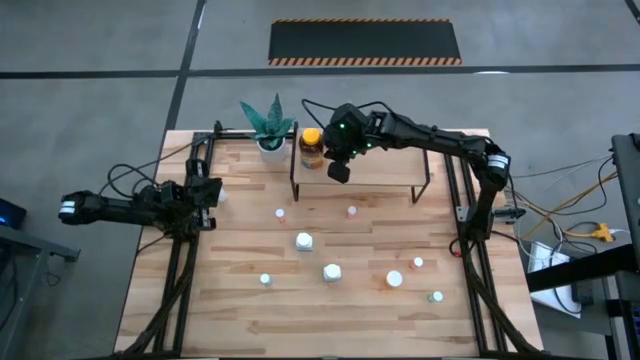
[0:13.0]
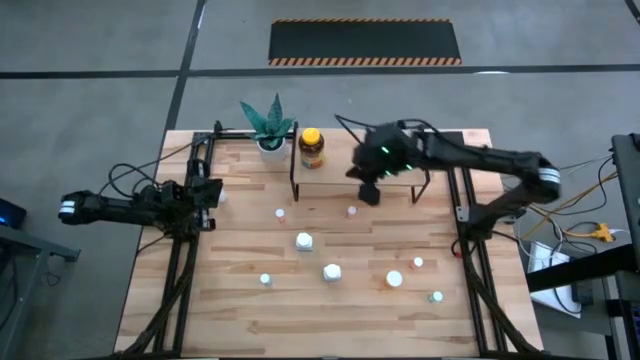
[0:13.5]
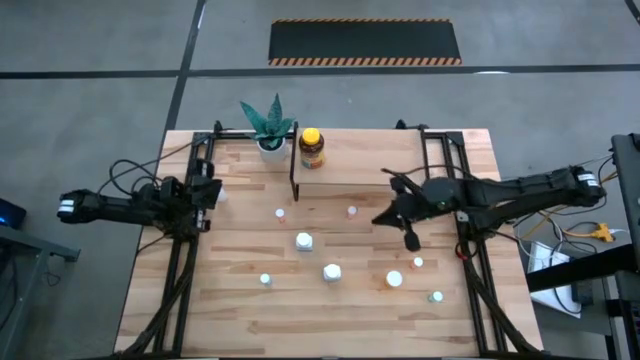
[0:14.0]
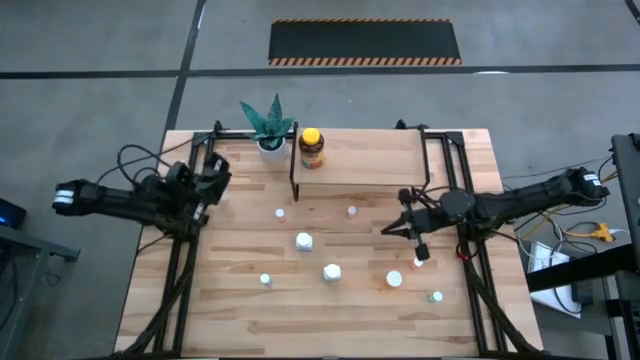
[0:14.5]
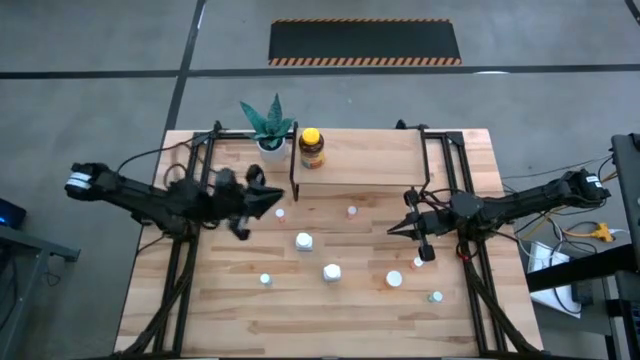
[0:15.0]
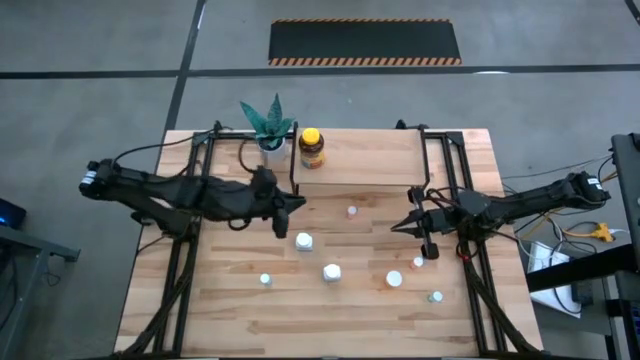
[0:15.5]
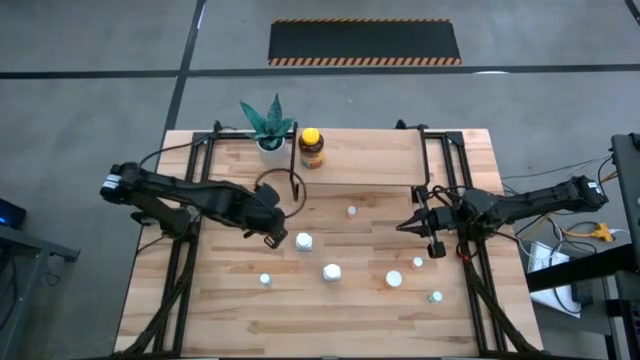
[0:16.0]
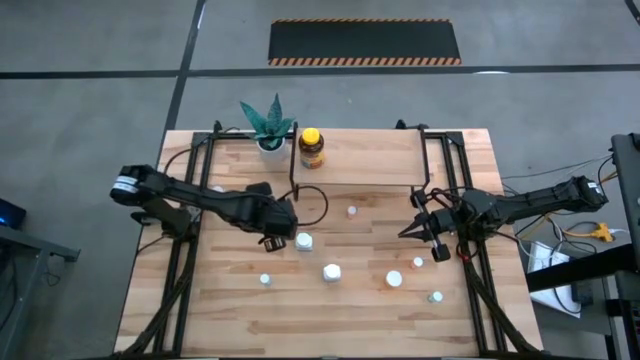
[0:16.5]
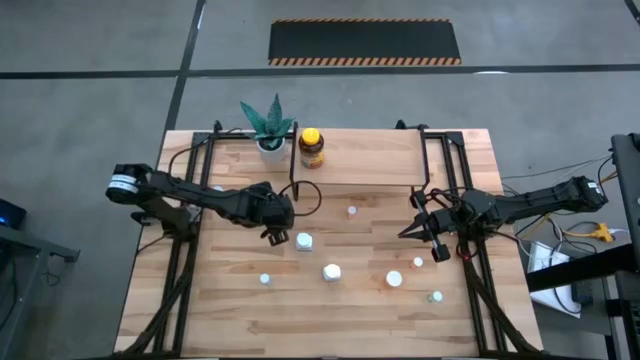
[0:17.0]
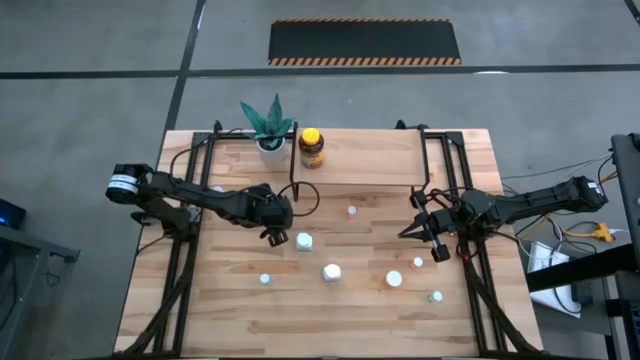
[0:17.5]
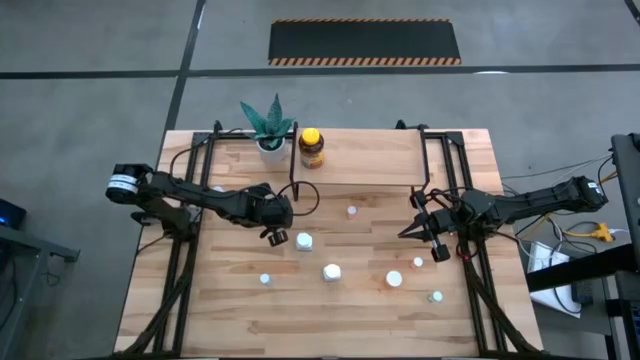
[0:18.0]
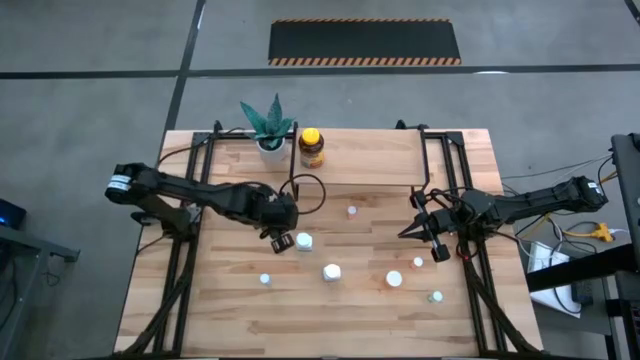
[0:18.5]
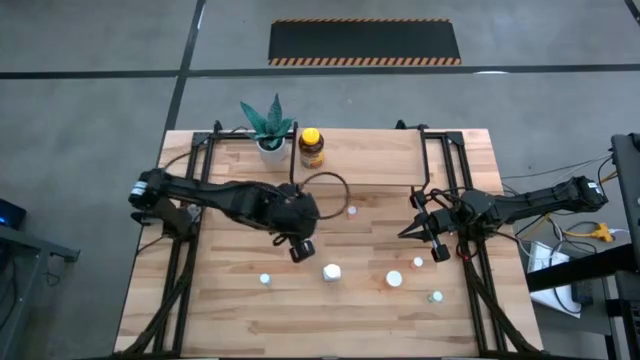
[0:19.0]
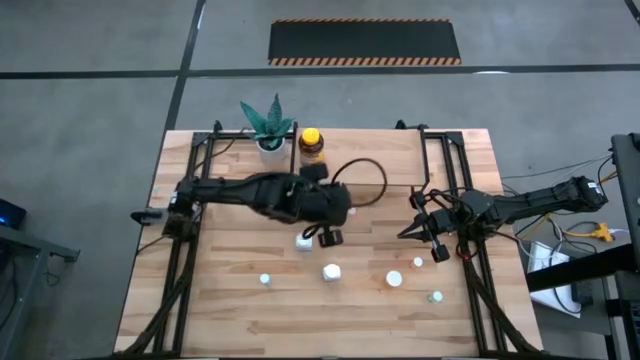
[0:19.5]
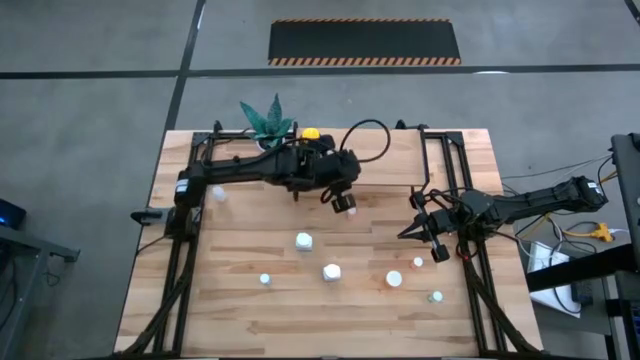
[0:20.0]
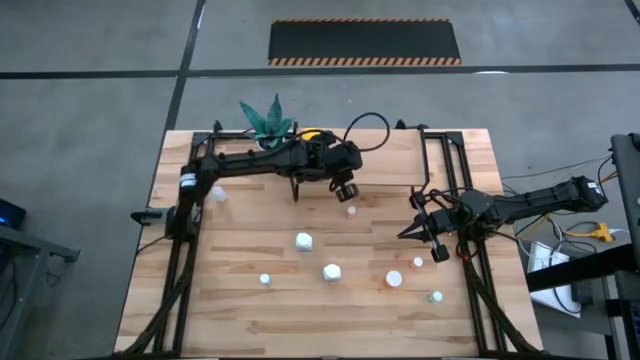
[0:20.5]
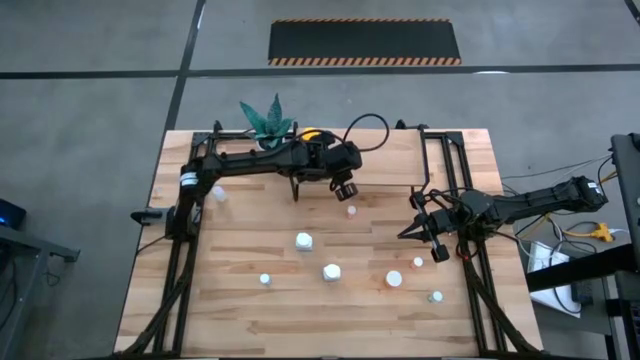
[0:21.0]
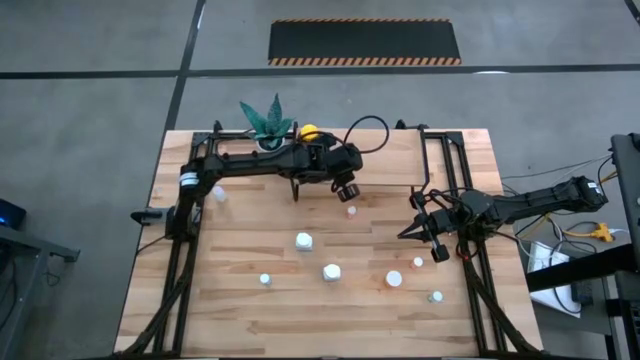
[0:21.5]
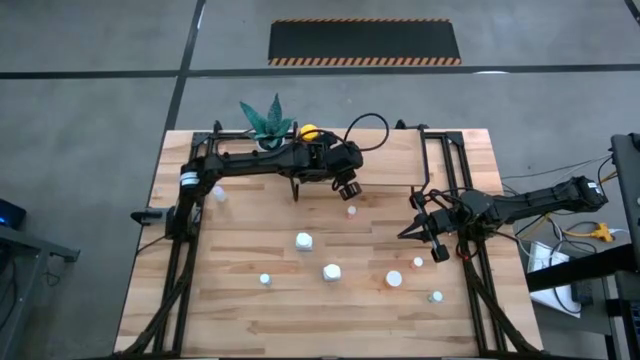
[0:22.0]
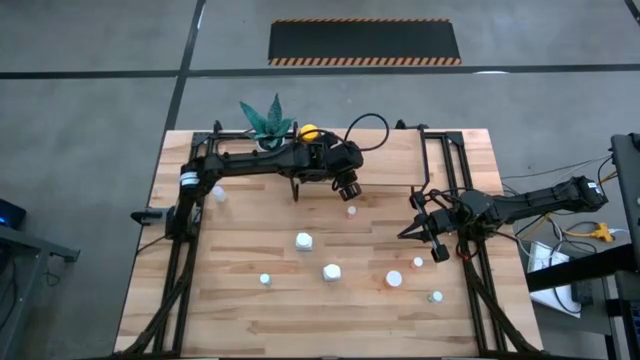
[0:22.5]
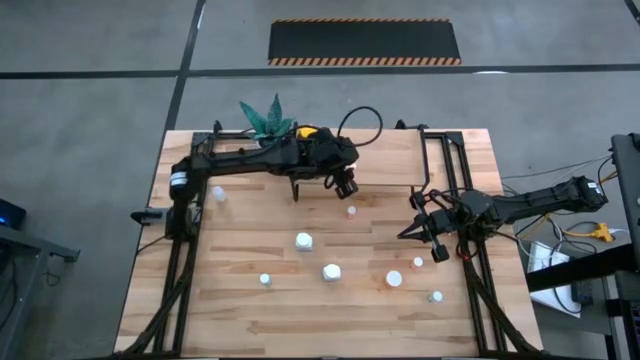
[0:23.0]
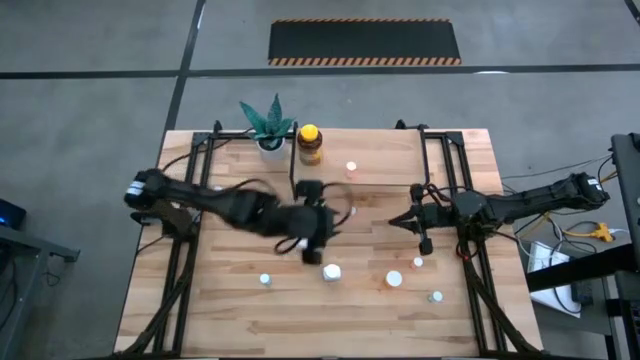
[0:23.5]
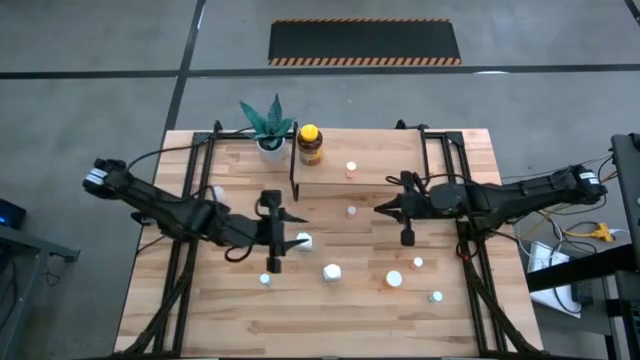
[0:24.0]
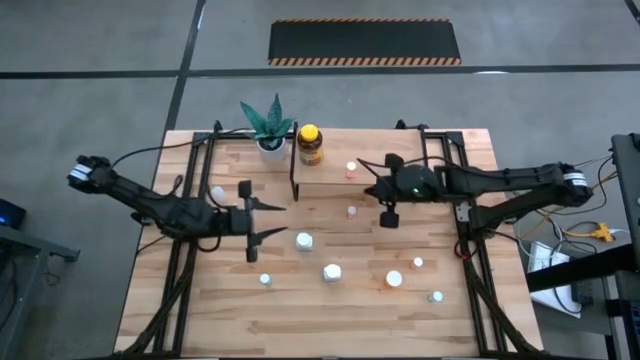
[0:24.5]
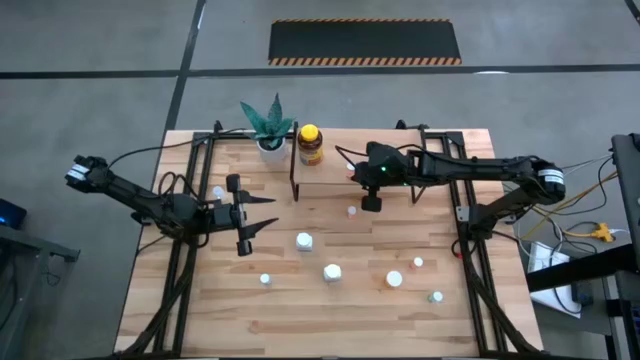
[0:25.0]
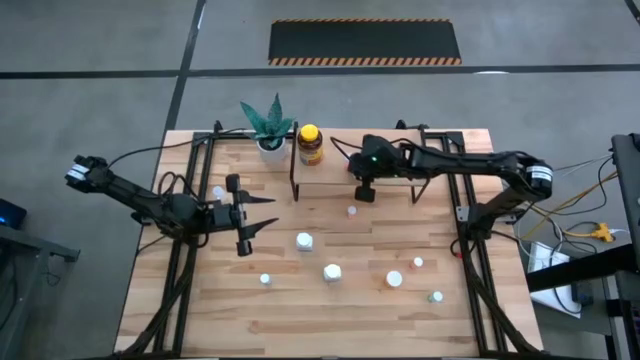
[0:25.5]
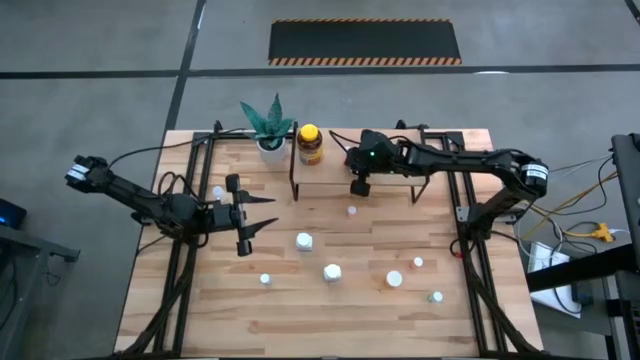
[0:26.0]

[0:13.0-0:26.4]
Task: Pick and place medicine bottles onto shelf by color
Put the top left pink medicine bottle on the shelf

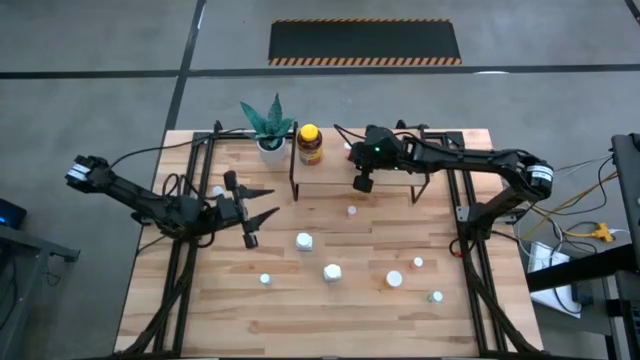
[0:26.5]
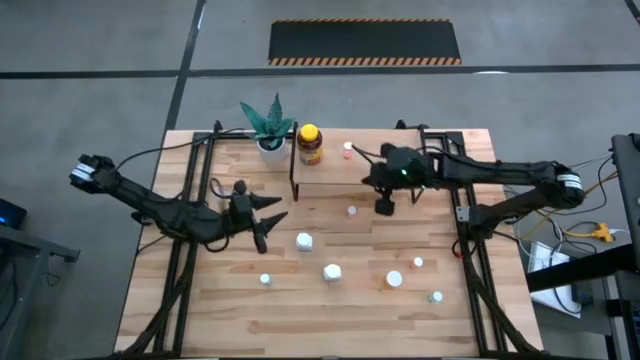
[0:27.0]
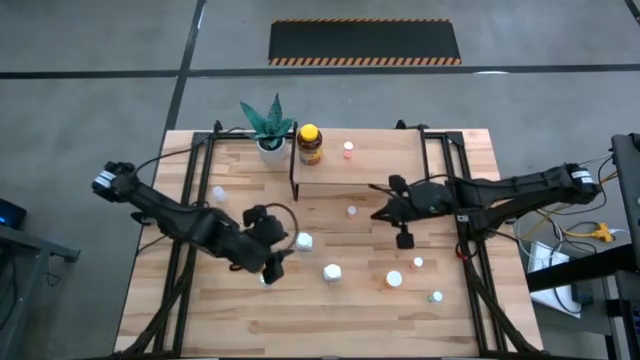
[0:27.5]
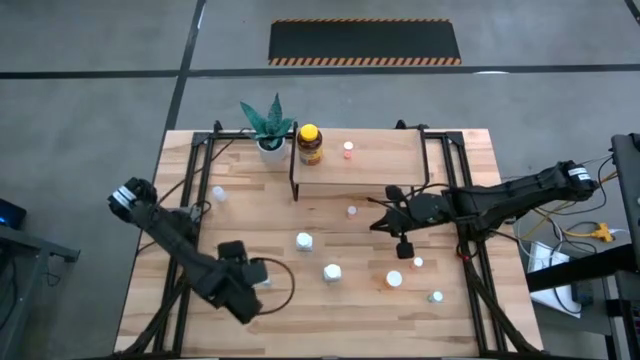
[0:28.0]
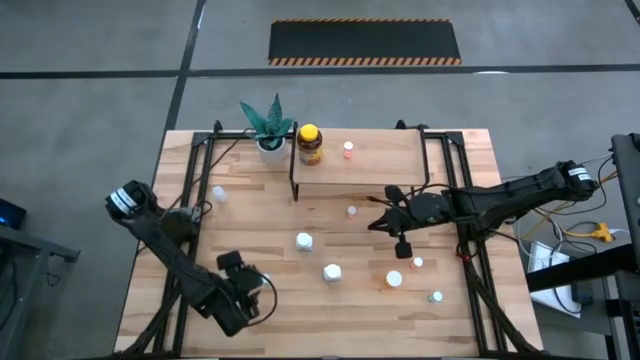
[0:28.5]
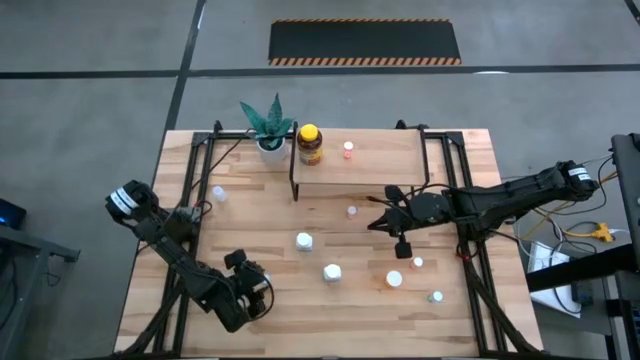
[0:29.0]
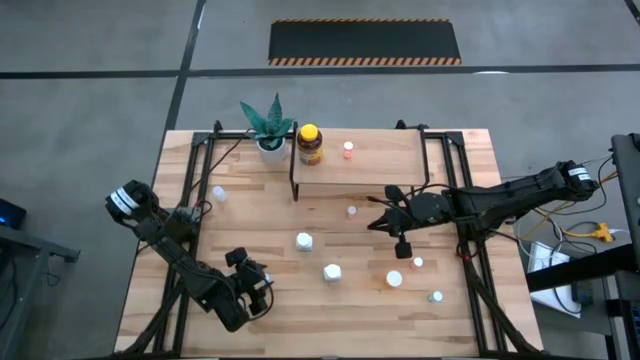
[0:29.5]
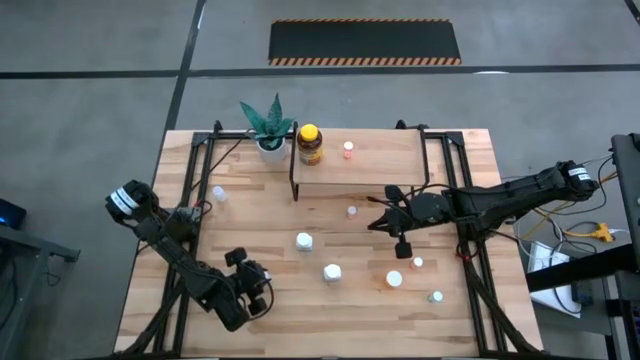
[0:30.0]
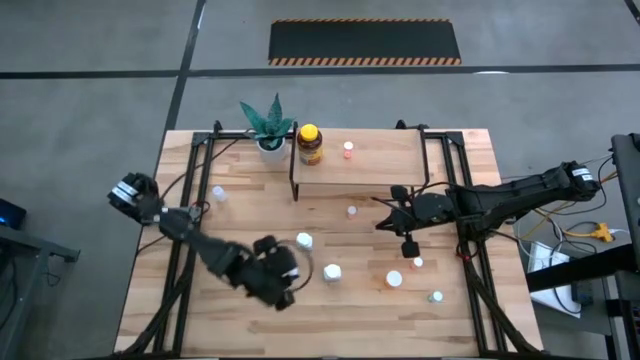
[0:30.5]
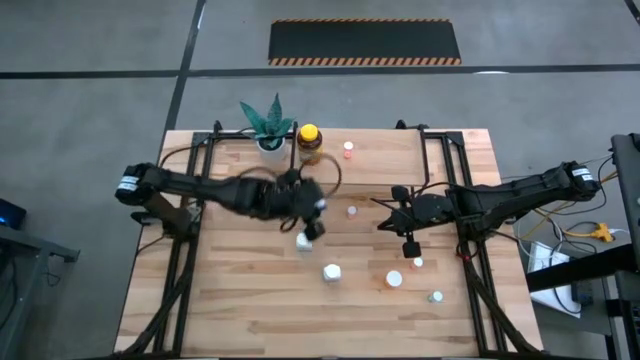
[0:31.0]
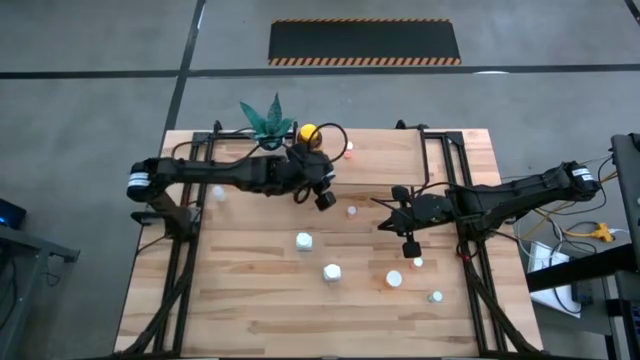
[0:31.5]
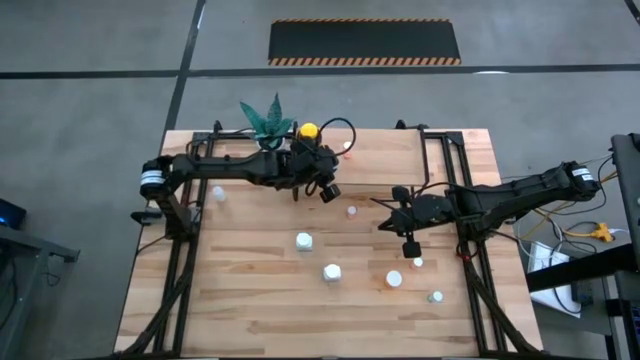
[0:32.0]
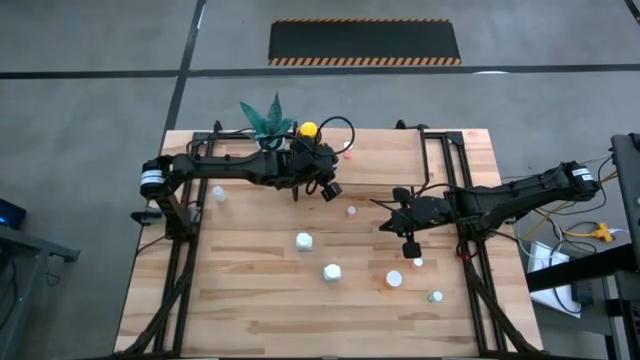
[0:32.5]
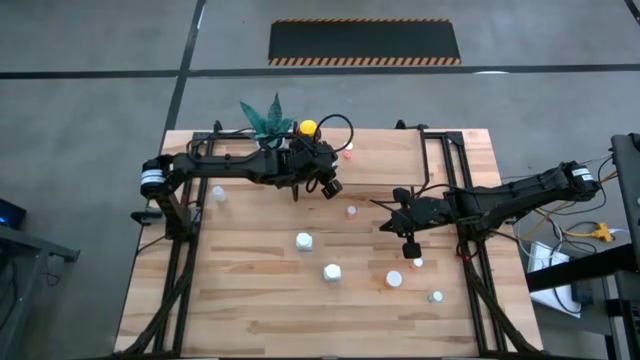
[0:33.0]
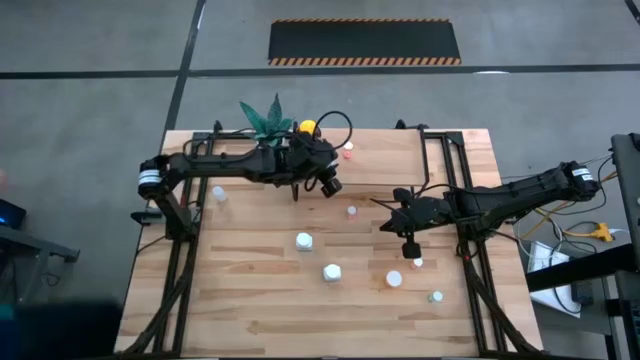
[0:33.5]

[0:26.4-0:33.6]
Put the left blue medicine bottle on the shelf

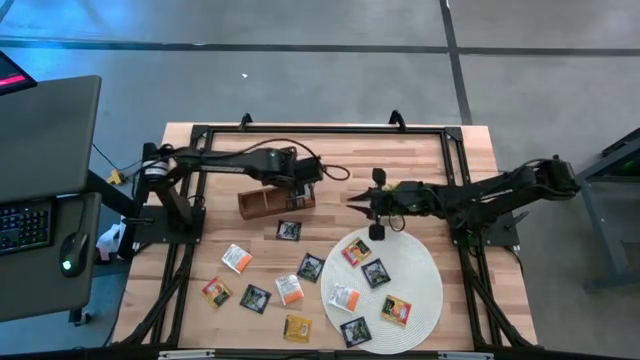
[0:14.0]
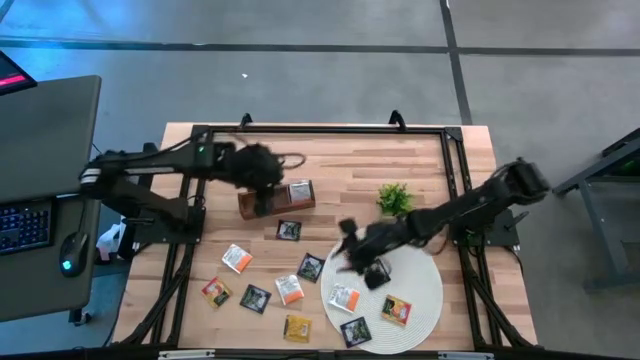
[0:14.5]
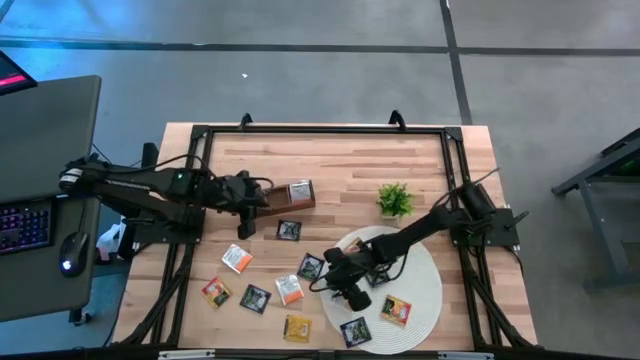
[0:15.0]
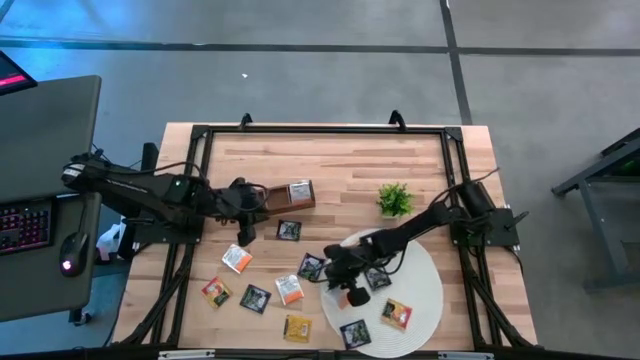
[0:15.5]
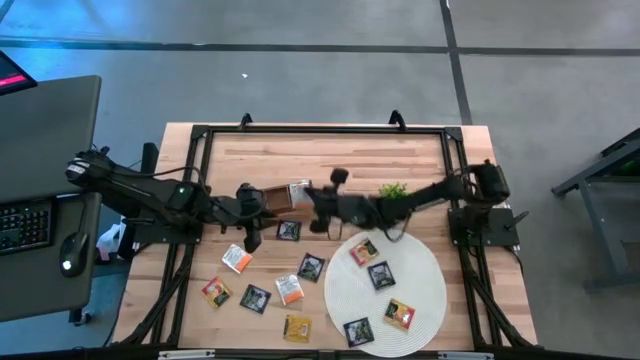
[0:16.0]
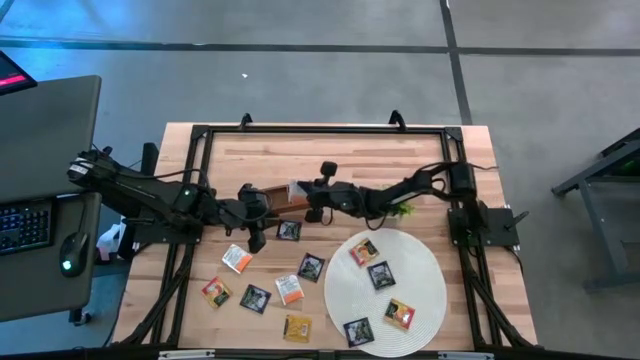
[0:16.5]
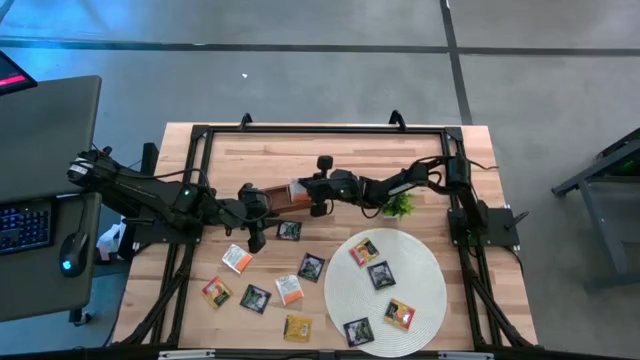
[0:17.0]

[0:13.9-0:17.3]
Task: Pick & Place Tea
Put the white tea bag into the right section of the wooden organizer
